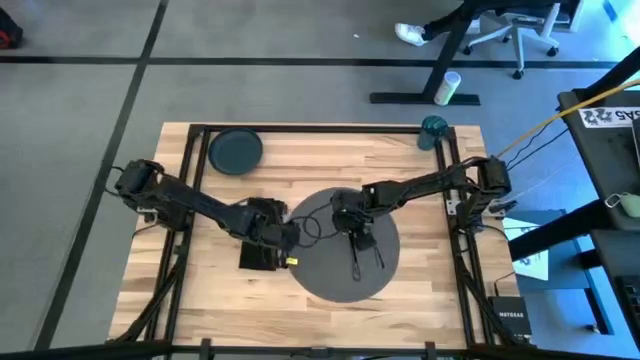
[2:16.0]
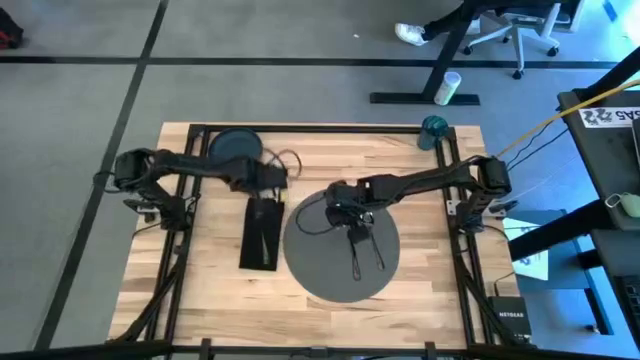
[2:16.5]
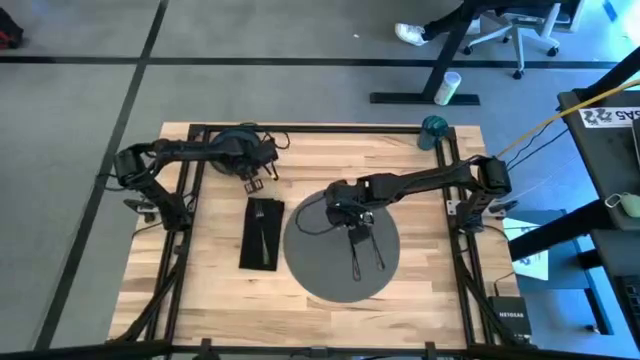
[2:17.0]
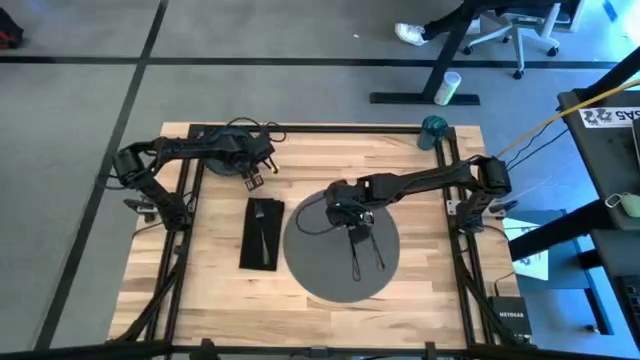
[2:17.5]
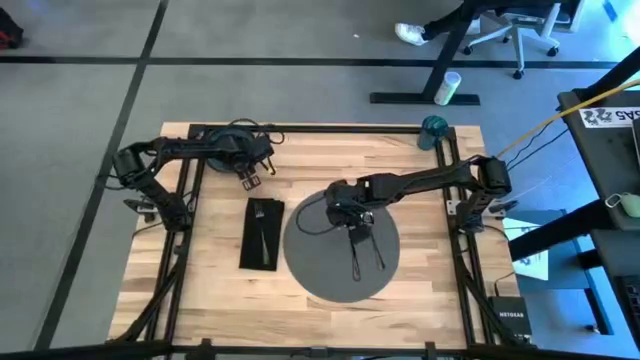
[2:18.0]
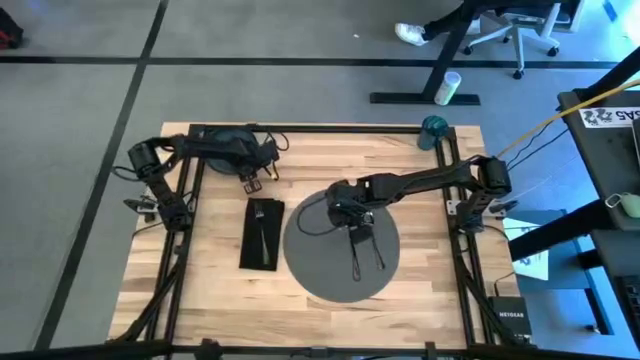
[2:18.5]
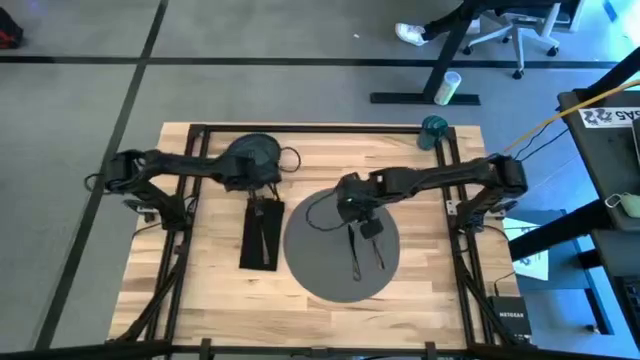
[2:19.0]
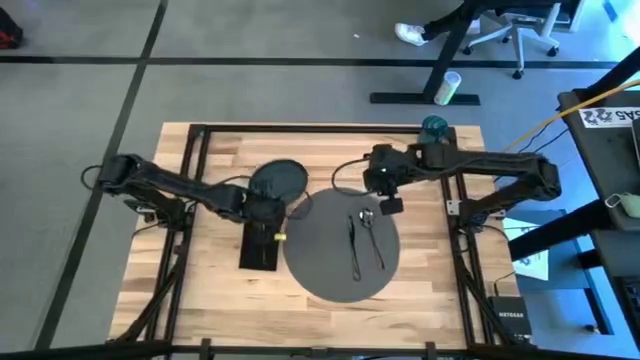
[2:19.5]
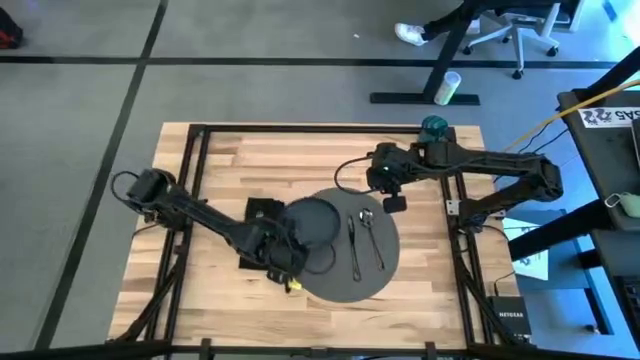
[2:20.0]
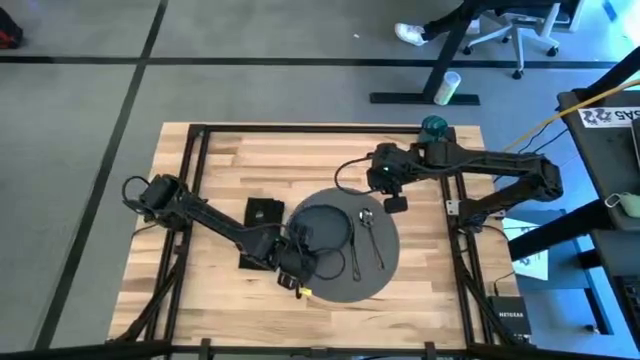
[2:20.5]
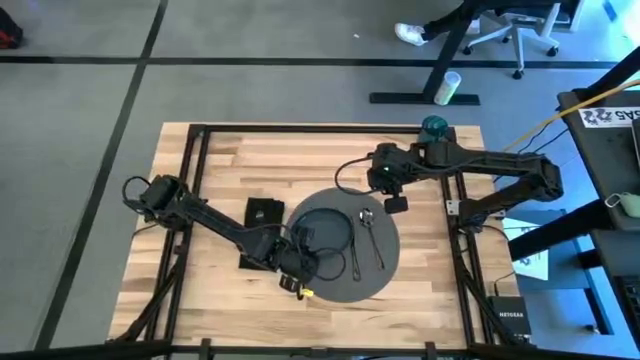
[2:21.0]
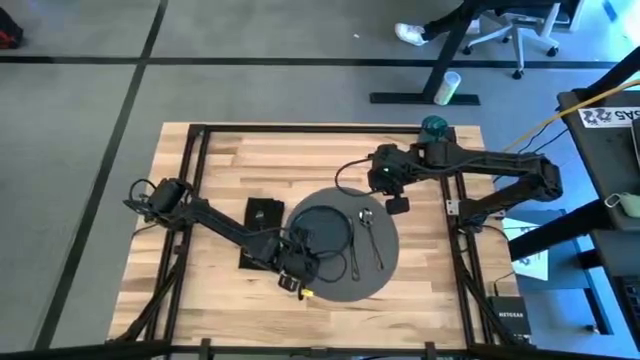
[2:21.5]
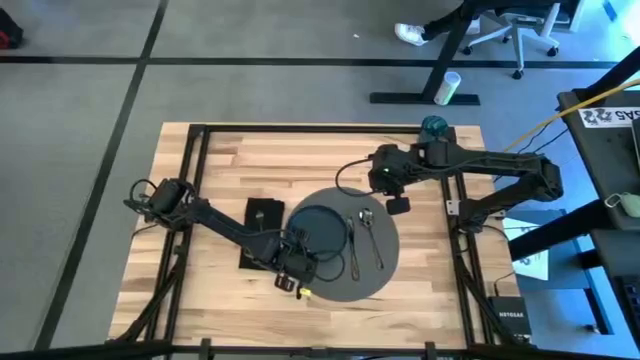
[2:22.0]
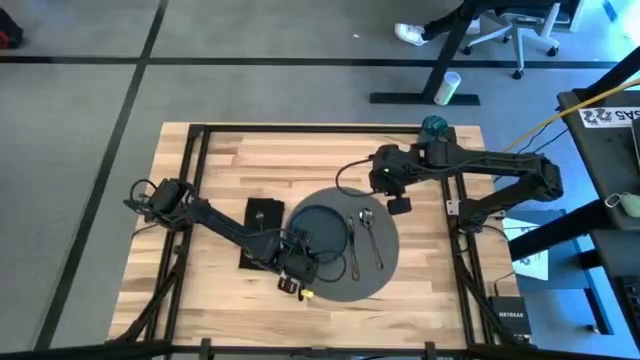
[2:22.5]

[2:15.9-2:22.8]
Task: Set table place
Put the dark blue plate on the gray table mat

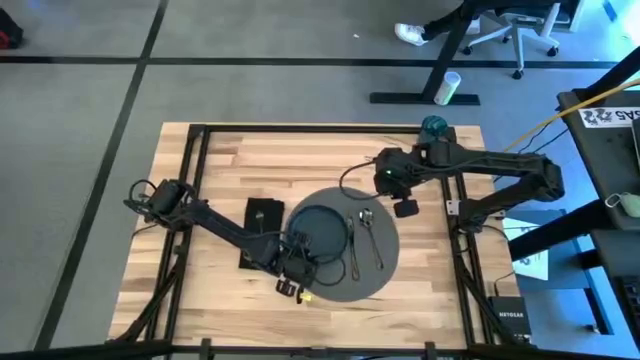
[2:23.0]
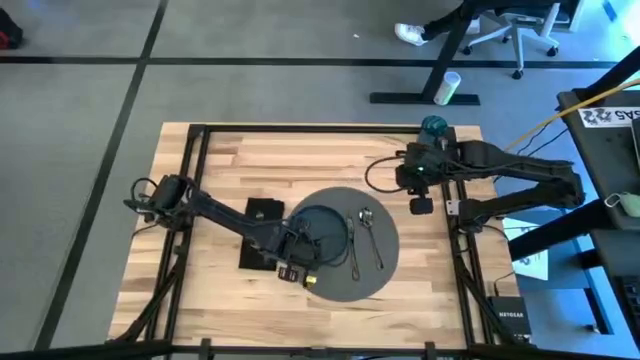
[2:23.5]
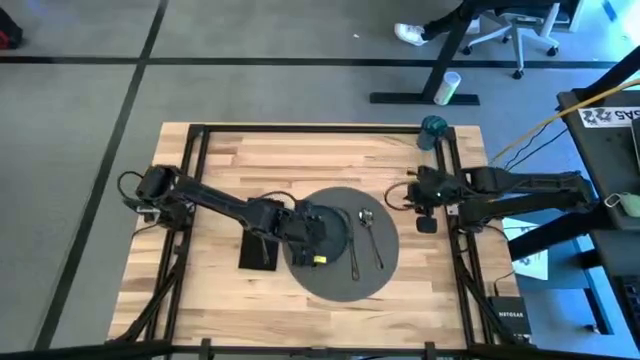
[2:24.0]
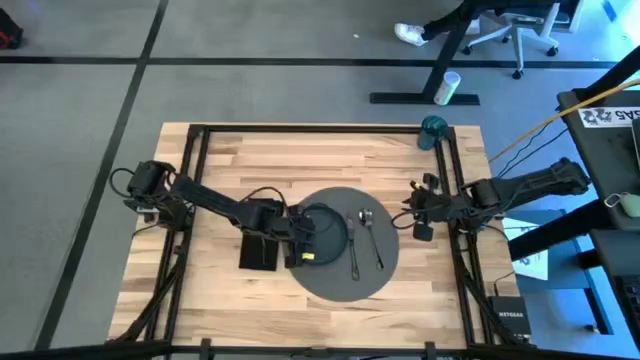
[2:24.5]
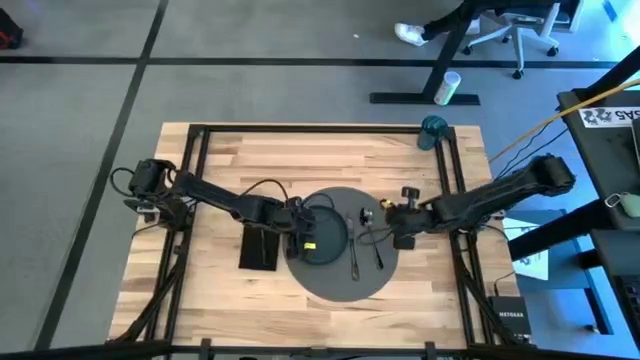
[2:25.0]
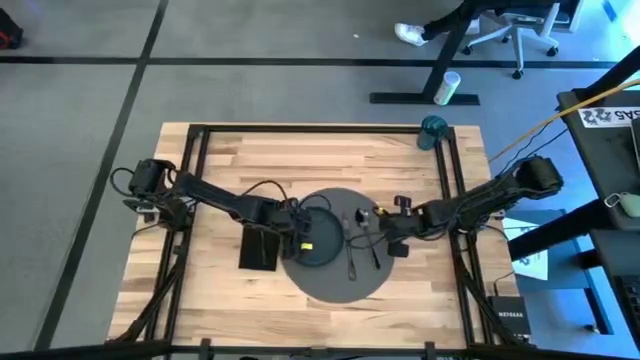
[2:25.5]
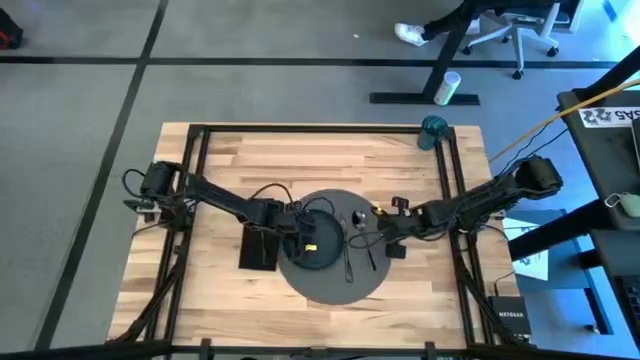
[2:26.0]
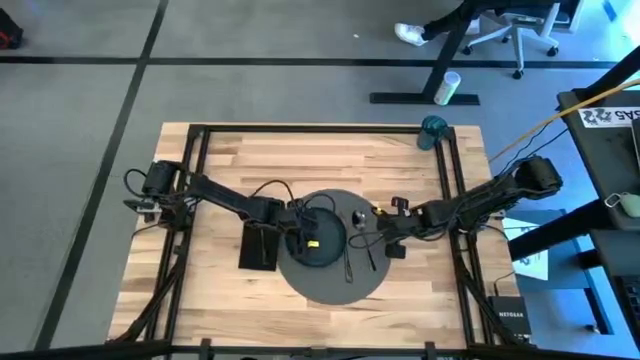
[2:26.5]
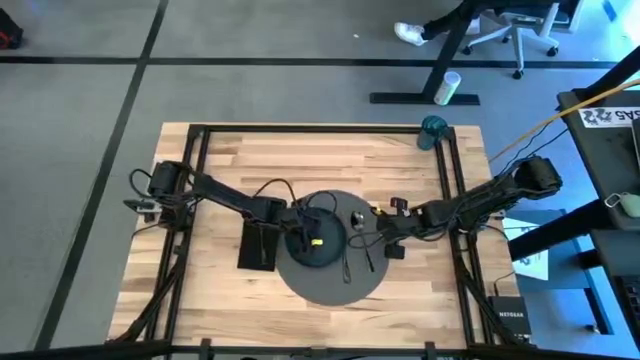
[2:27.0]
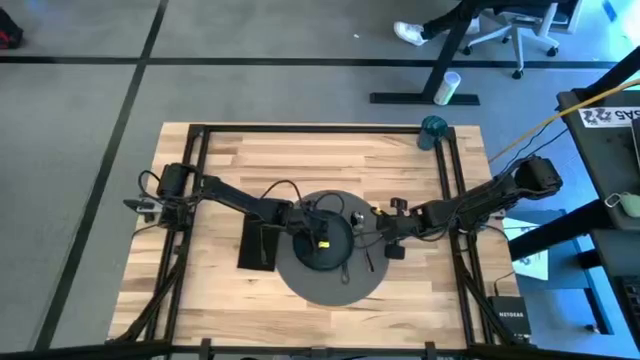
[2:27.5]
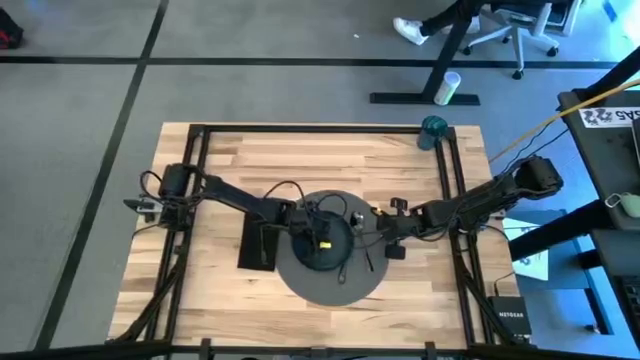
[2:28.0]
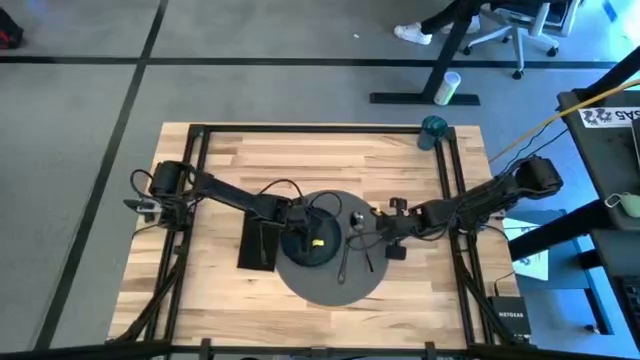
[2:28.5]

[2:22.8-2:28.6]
Adjust the dark blue plate on the gray table mat

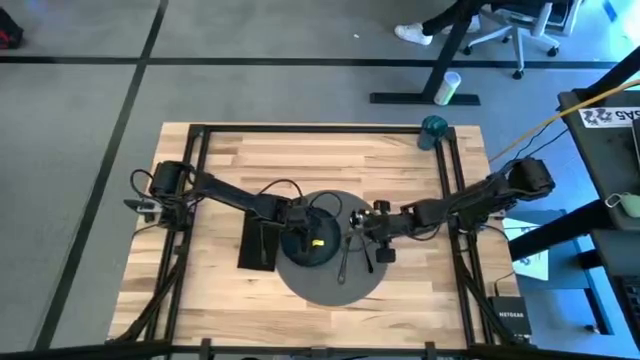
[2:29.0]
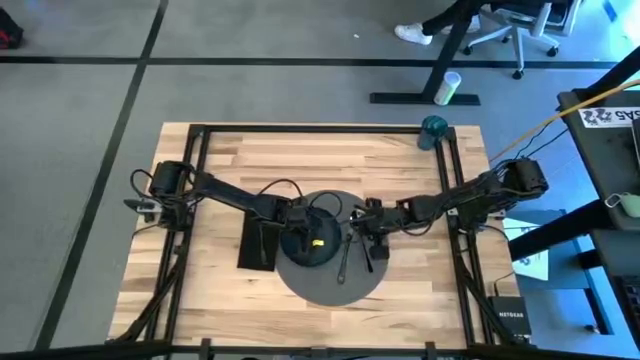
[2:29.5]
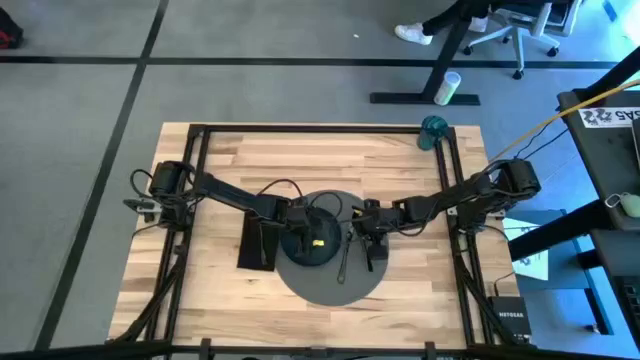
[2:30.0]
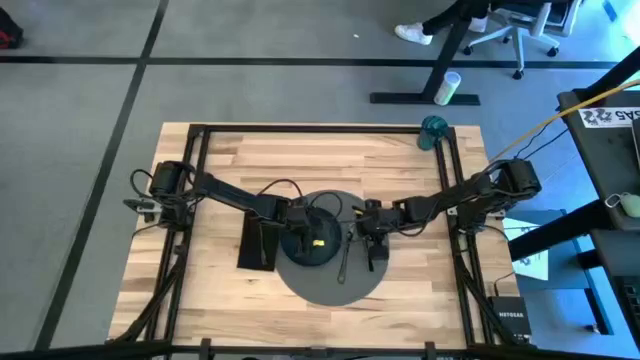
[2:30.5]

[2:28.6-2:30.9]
Adjust the black spoon on the gray table mat

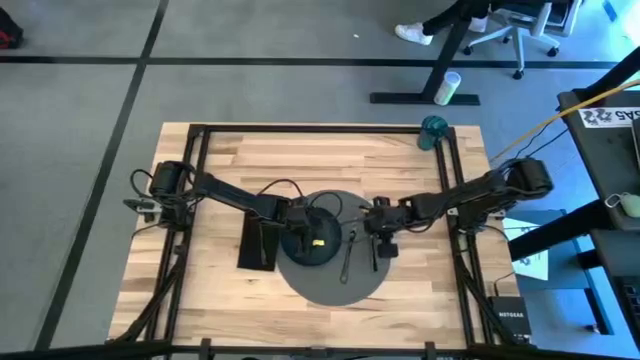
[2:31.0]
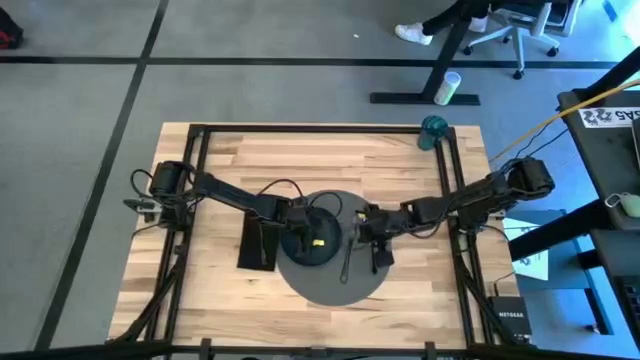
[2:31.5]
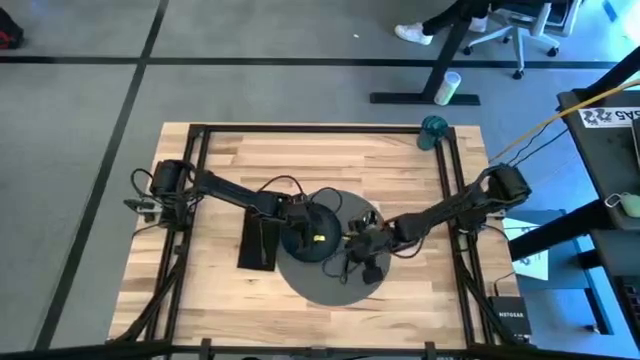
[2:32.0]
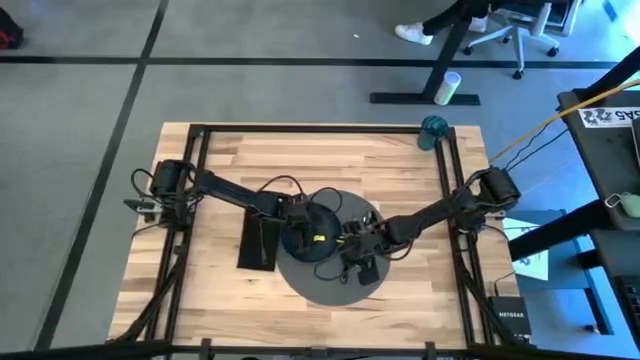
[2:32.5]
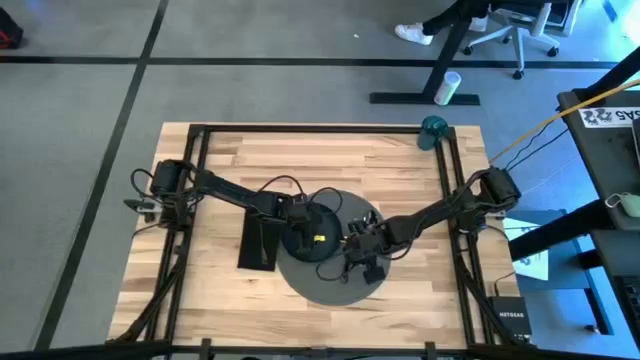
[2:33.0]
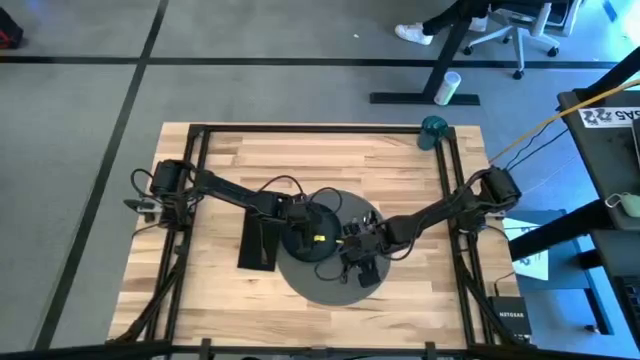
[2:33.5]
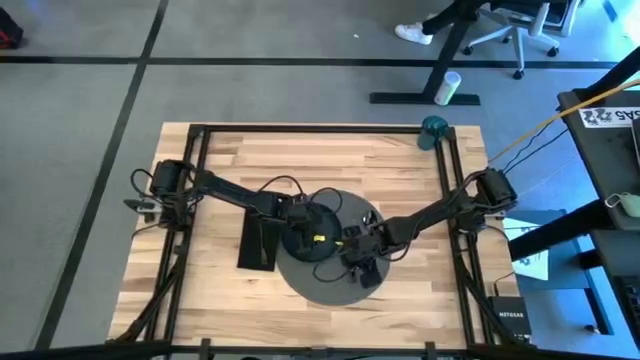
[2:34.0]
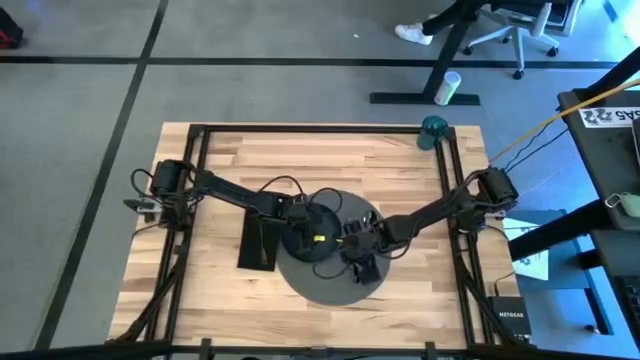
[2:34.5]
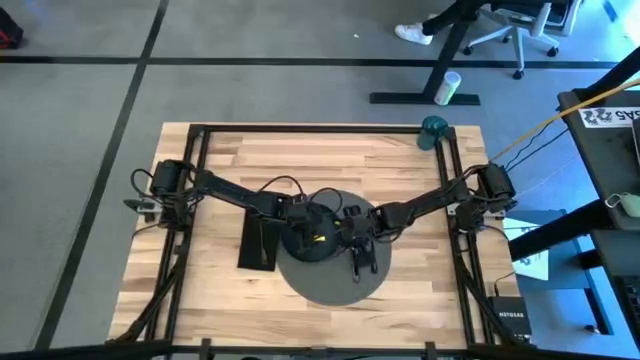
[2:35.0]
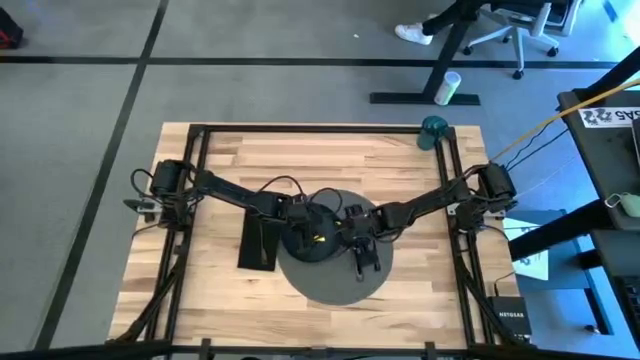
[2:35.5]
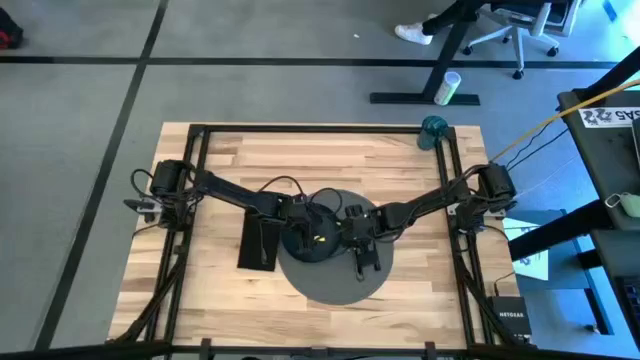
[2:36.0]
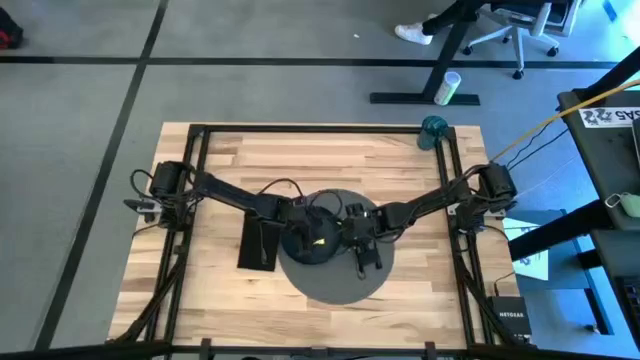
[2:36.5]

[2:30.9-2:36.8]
Adjust the black knife on the gray table mat
